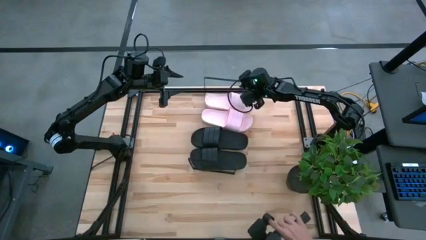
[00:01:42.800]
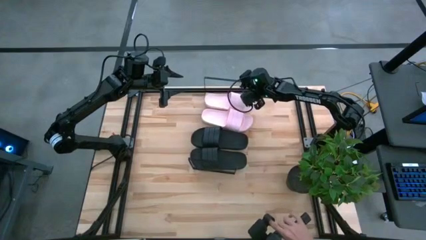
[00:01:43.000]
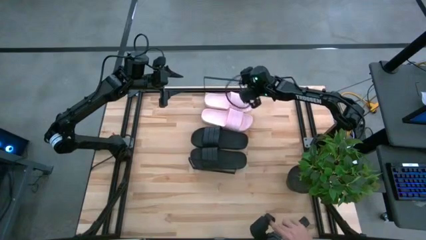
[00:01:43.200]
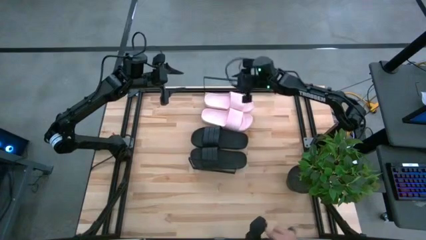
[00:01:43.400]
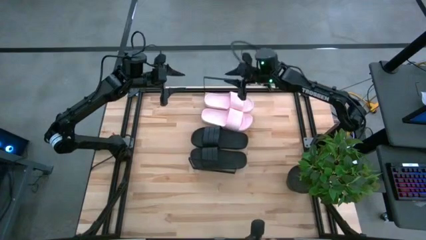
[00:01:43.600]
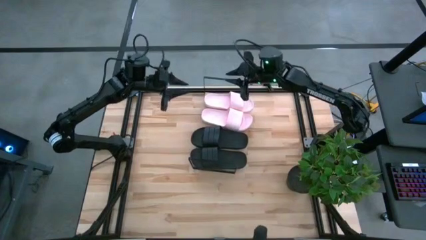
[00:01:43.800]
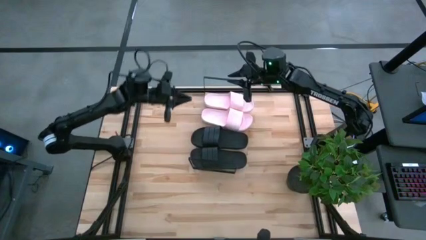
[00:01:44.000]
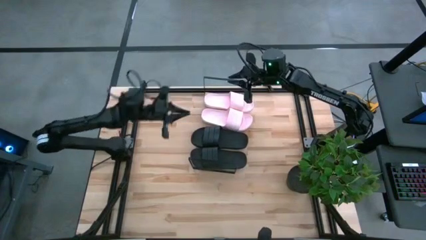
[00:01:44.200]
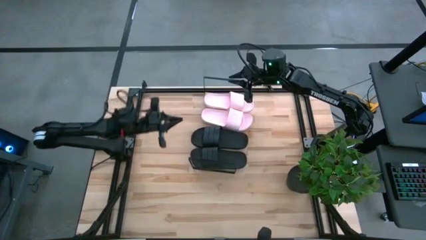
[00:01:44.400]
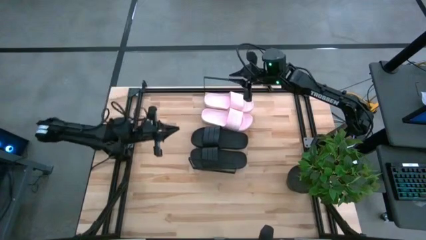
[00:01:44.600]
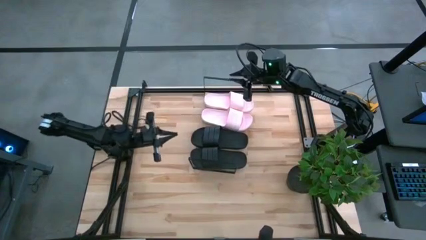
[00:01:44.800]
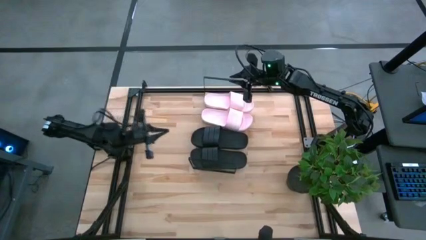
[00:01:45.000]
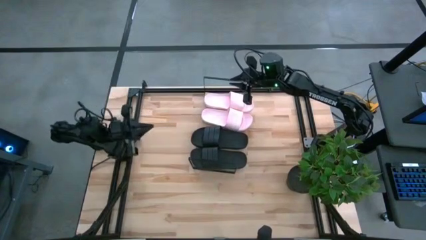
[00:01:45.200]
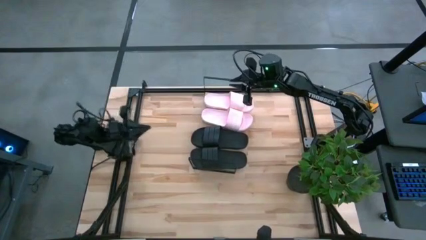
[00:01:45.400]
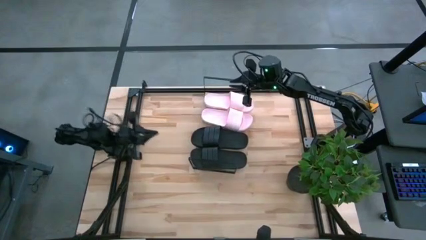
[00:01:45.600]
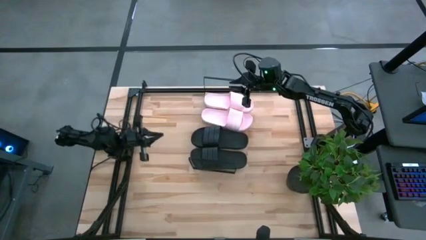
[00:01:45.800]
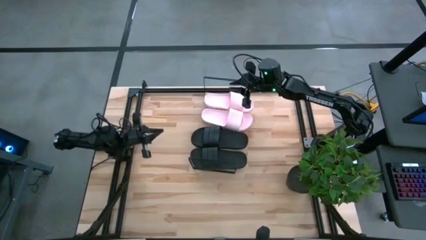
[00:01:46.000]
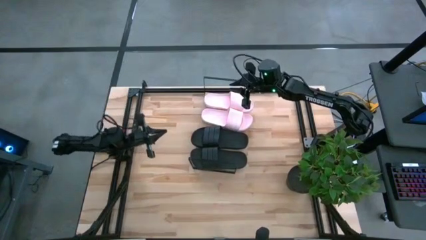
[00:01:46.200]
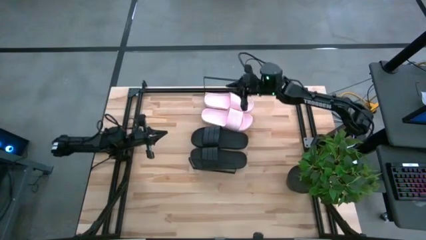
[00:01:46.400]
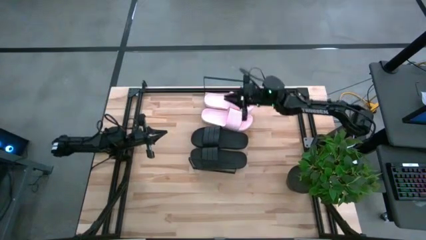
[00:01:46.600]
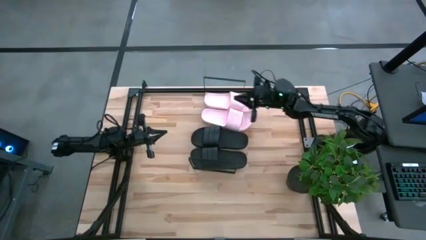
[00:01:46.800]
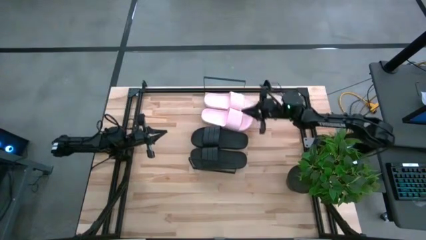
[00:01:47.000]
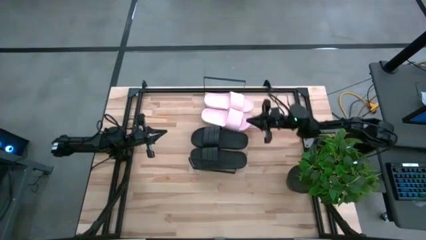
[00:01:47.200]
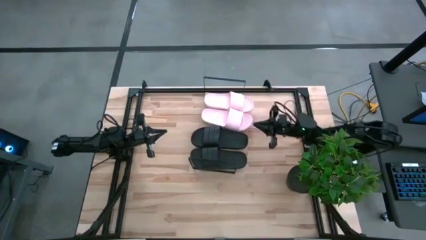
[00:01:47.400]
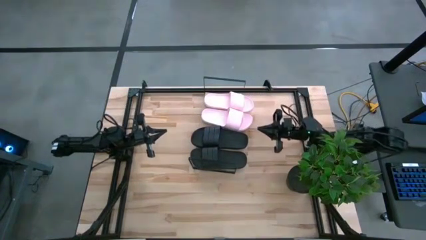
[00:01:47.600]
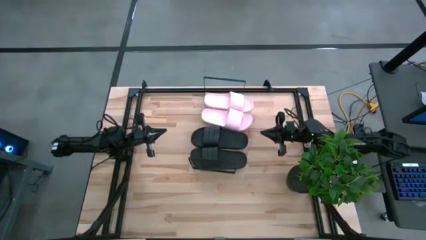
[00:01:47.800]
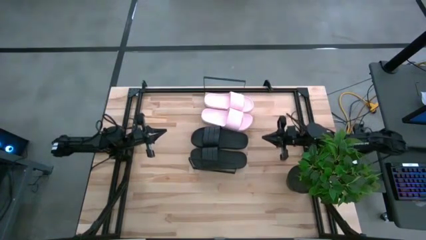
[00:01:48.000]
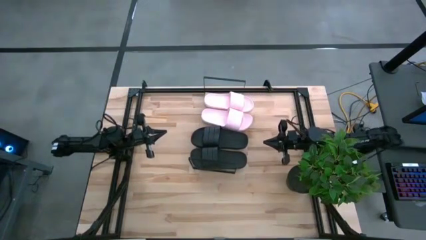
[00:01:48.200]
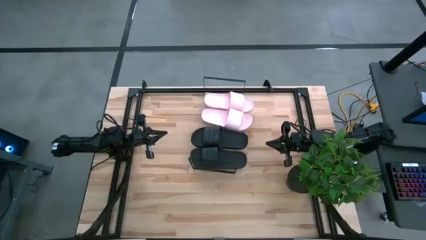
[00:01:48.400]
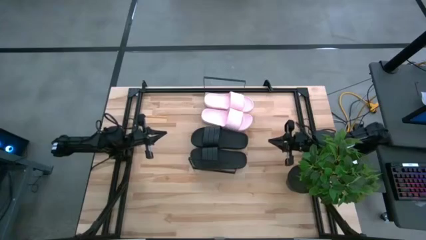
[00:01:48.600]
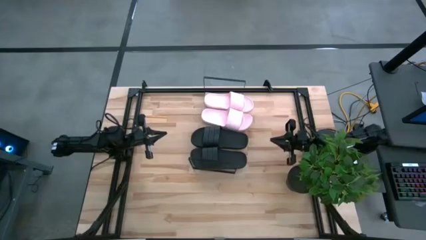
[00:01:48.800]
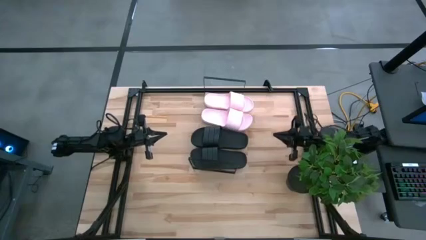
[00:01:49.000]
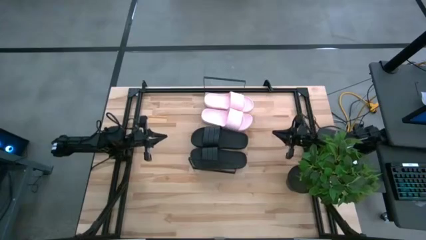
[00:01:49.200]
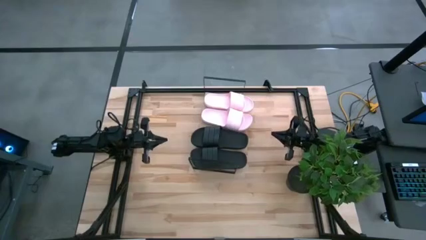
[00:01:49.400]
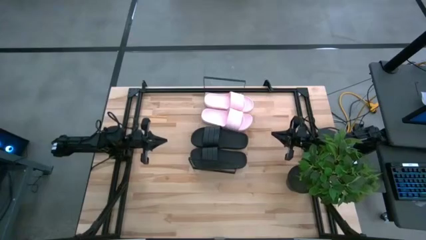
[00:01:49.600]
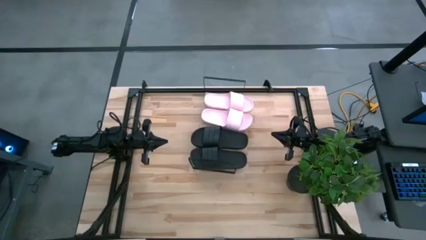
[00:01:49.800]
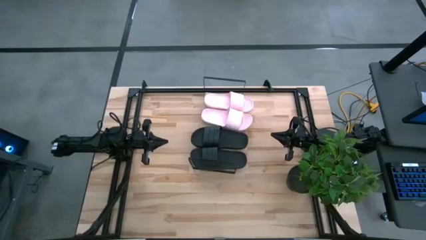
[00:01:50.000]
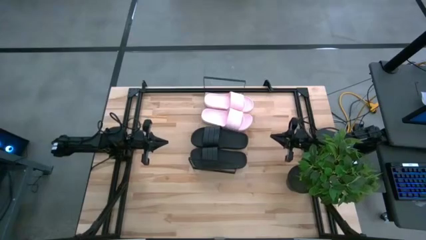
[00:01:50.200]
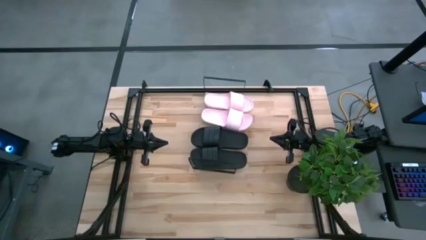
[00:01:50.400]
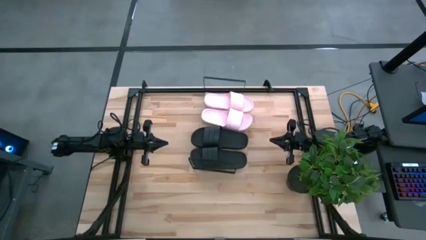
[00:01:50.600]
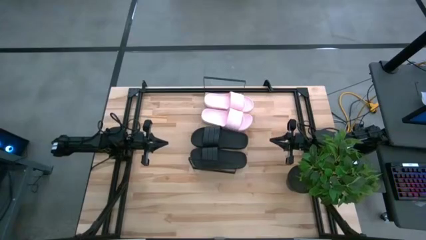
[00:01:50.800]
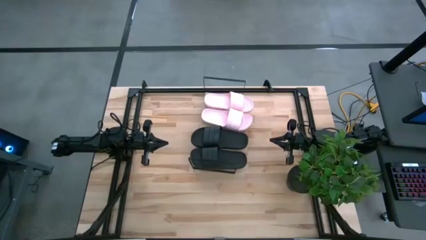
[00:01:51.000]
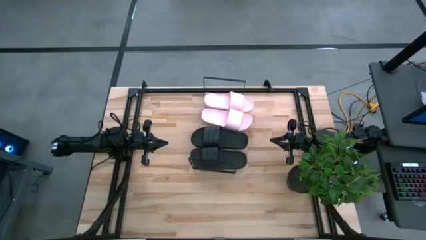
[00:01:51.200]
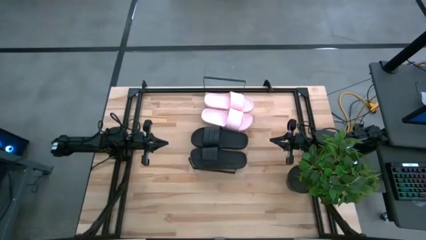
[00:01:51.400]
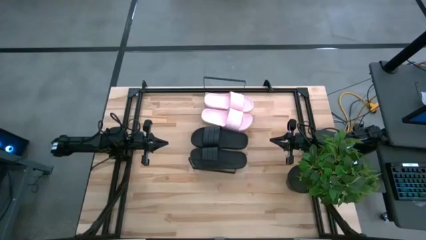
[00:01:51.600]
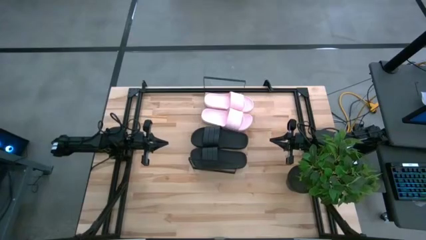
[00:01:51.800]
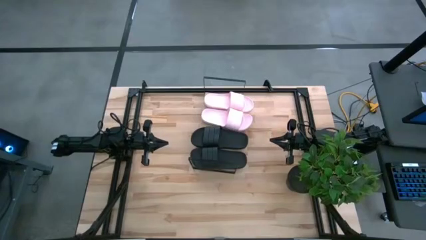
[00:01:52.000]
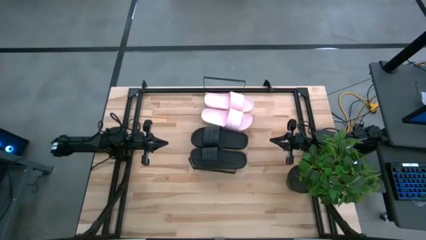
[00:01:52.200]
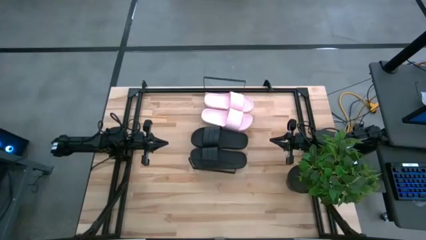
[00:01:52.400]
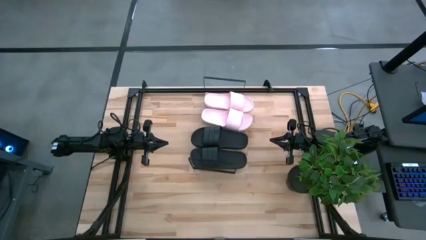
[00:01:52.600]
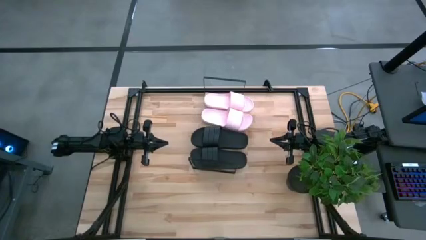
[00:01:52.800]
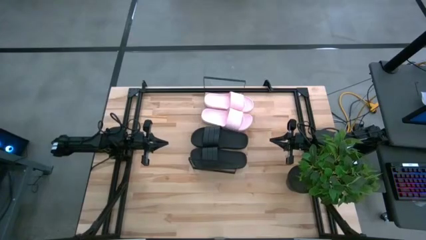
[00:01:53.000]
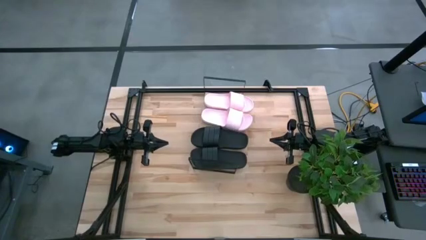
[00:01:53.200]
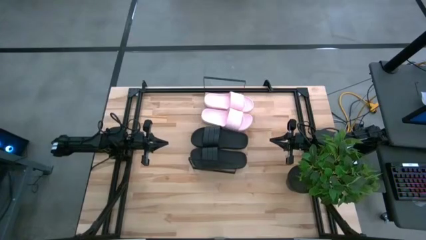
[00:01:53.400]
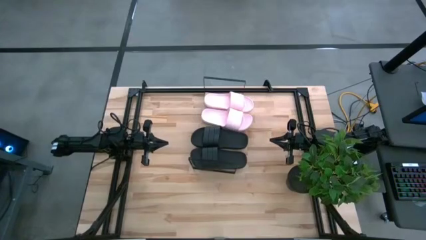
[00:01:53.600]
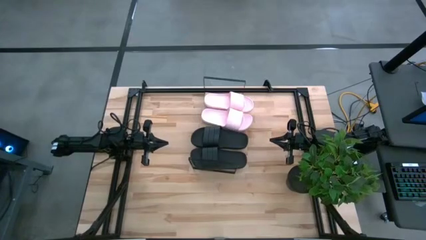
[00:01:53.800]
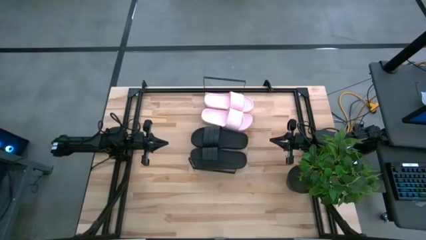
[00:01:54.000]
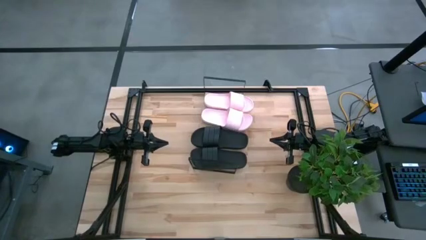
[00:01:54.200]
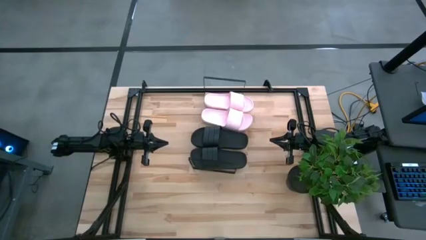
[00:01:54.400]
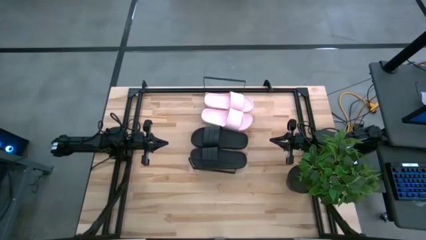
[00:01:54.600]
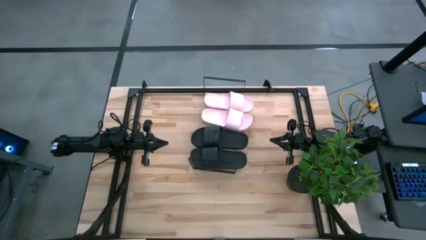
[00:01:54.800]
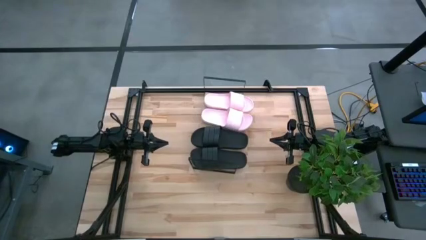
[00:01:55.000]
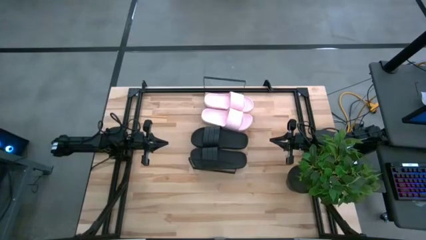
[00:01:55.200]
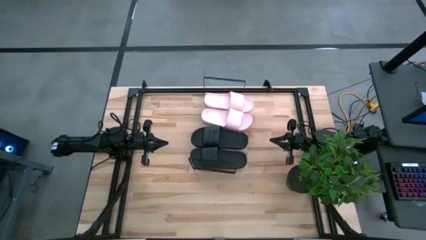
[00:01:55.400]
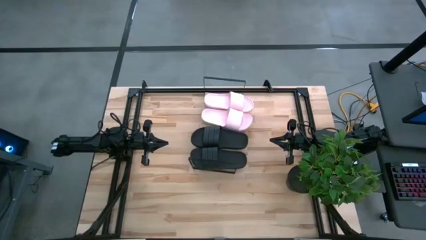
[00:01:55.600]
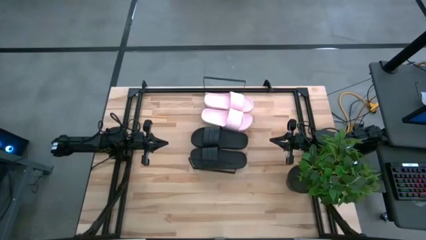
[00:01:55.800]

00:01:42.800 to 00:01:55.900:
Task: Pick and place slides into the shelf
Return to Home Position
